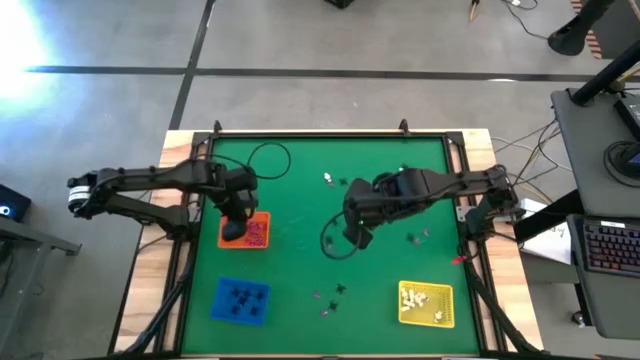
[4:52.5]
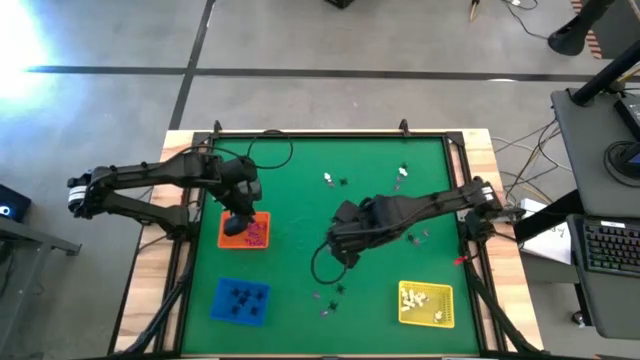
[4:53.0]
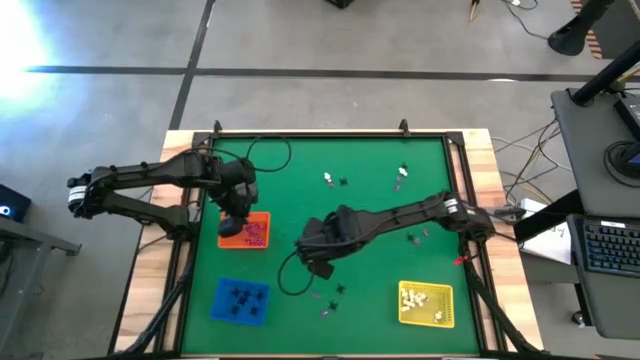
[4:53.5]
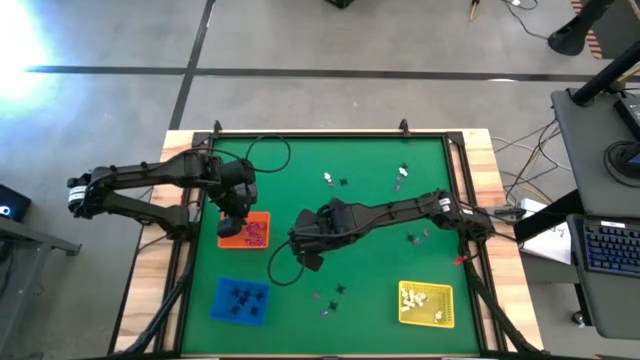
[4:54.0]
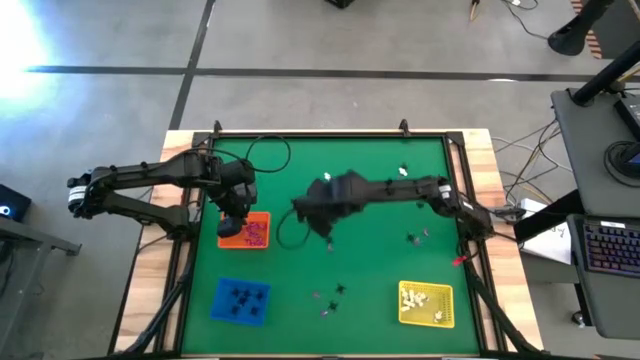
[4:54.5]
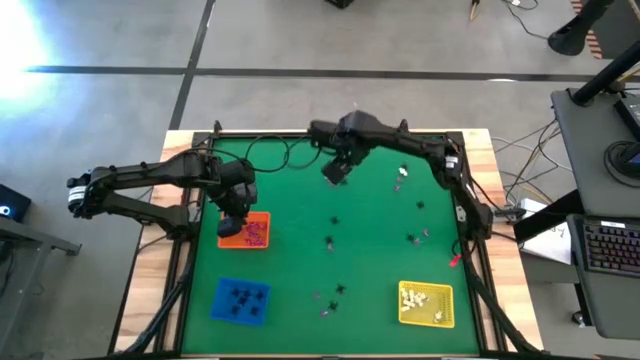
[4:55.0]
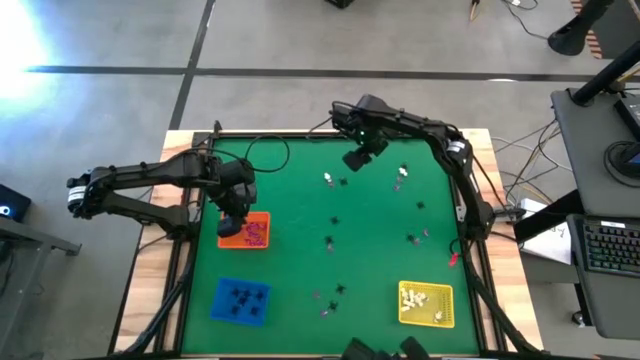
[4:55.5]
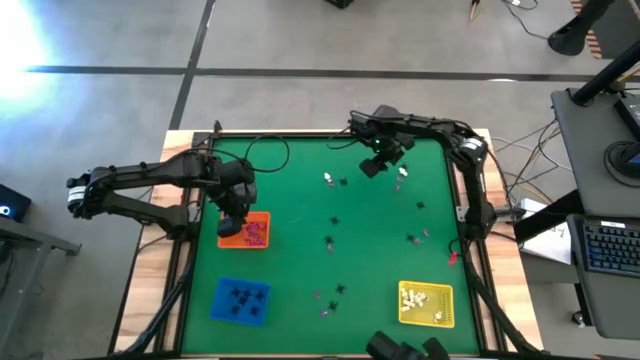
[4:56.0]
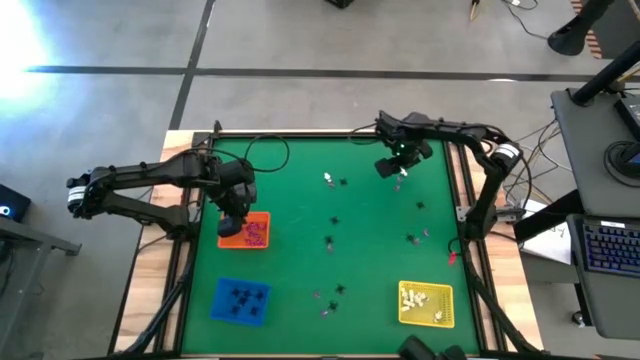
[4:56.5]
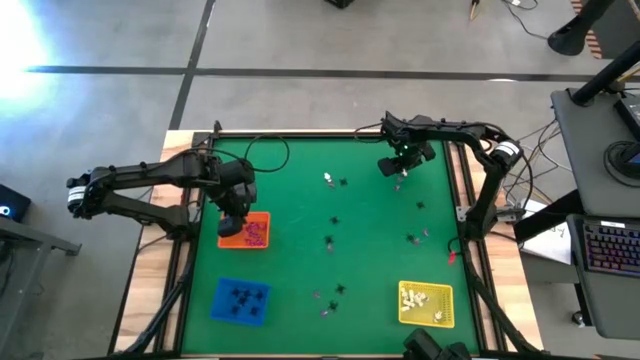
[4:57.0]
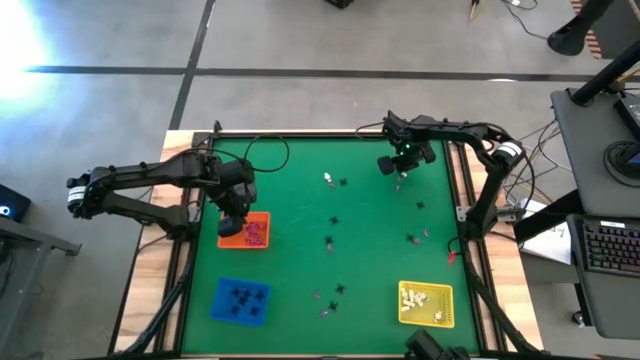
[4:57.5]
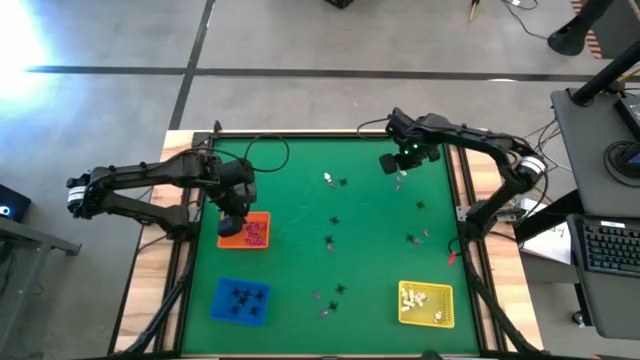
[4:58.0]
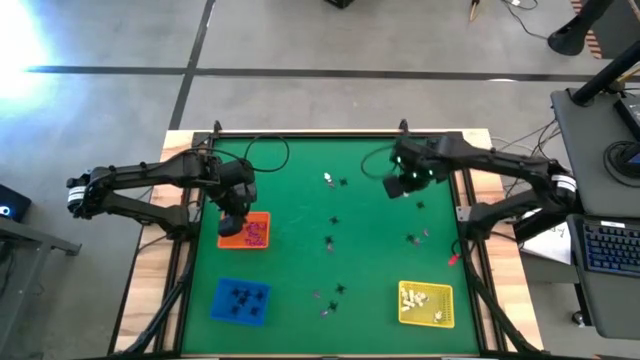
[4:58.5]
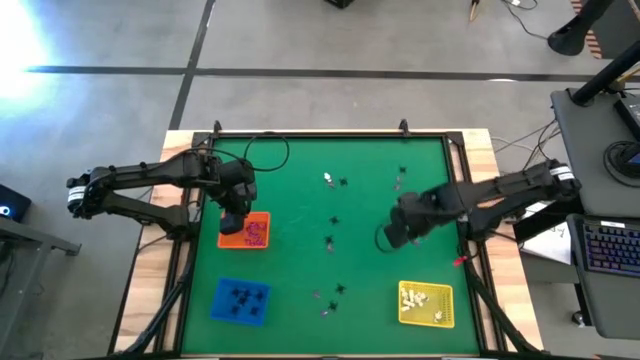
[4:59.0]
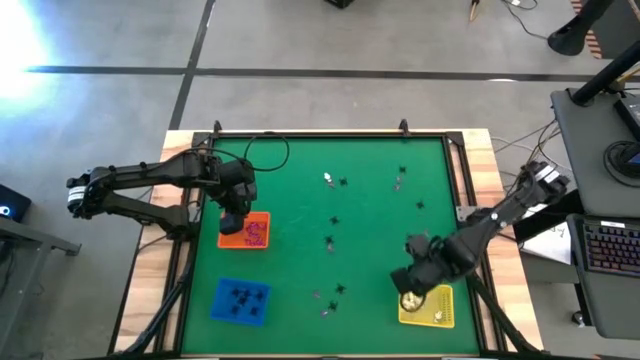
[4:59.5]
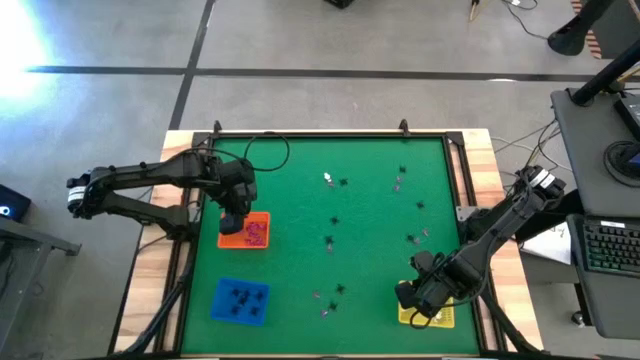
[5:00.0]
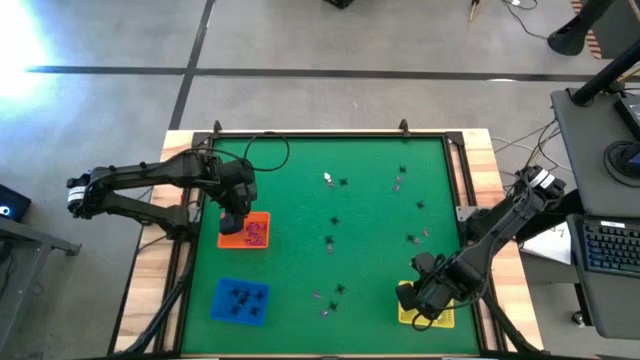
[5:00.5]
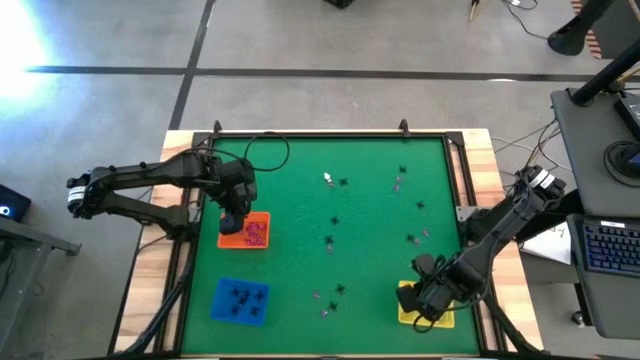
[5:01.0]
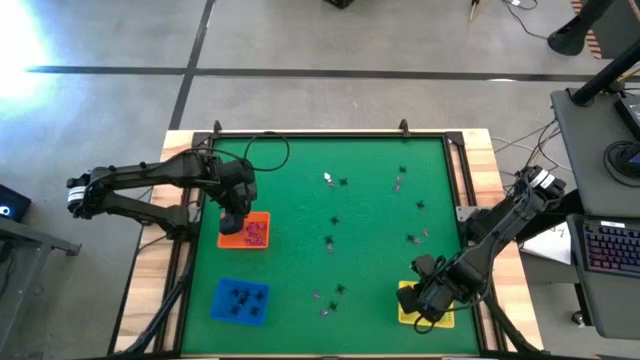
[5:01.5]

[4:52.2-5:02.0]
Task: Sort Halloween decoration
Put the white skeleton toy into the yellow bin

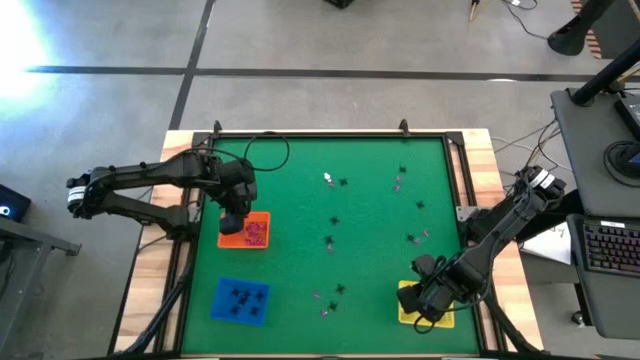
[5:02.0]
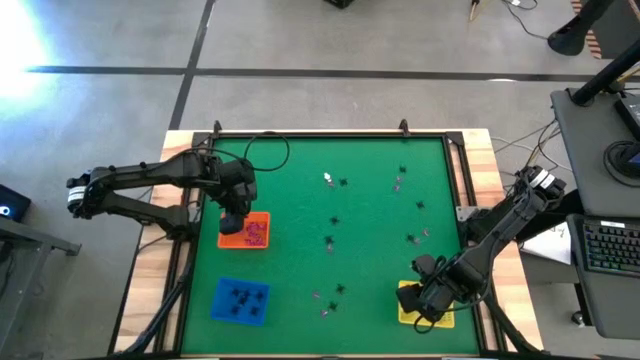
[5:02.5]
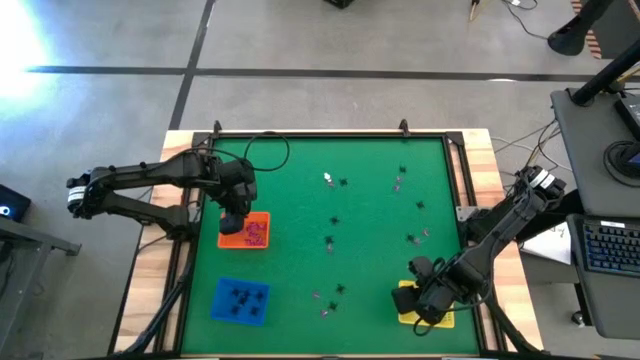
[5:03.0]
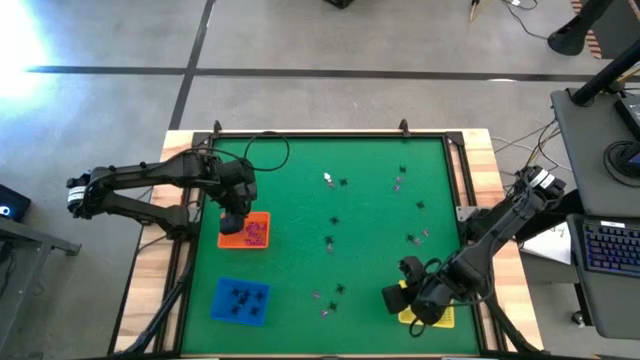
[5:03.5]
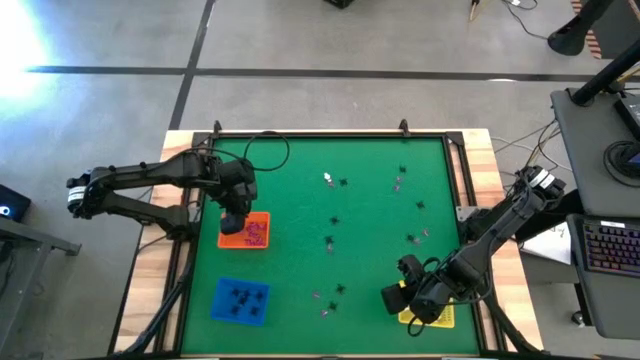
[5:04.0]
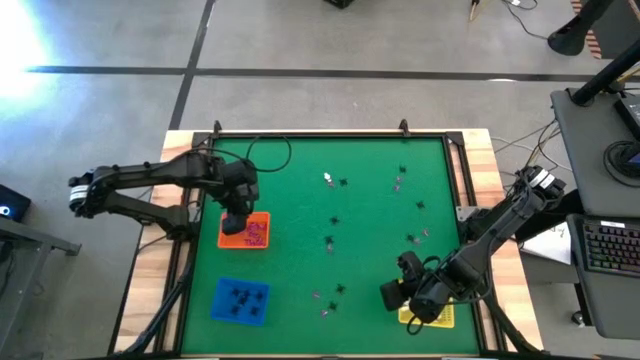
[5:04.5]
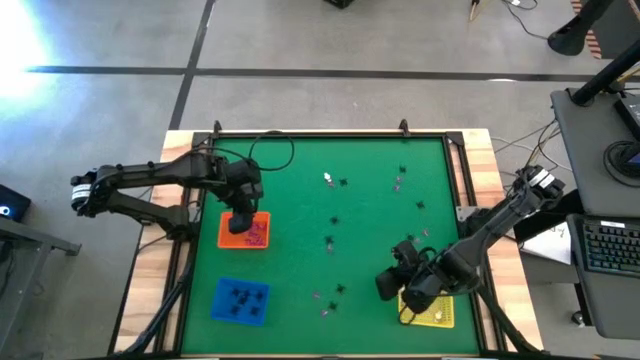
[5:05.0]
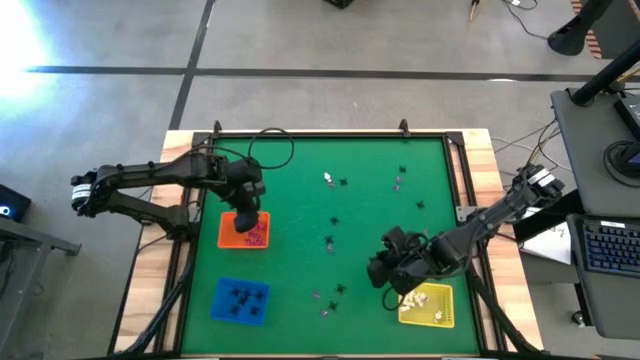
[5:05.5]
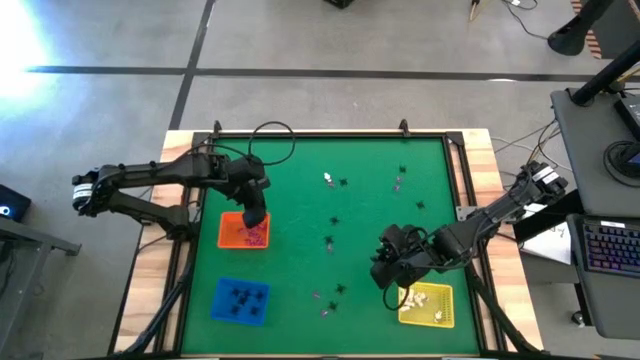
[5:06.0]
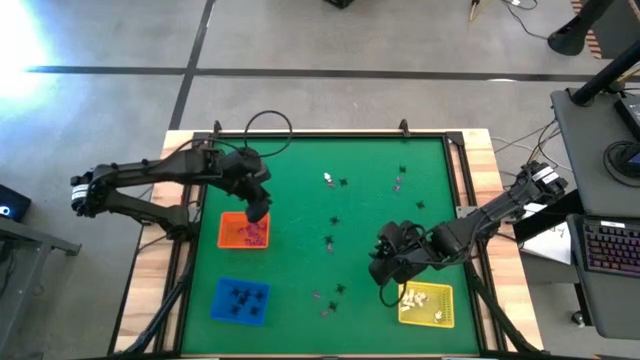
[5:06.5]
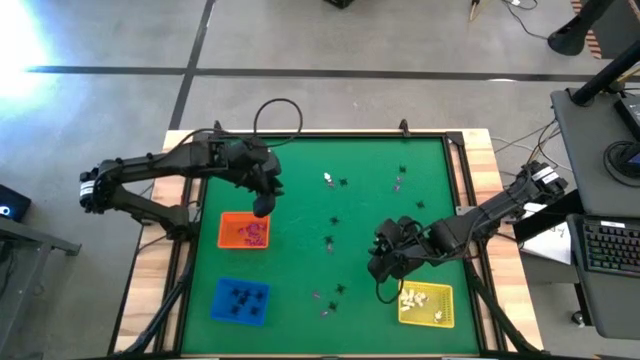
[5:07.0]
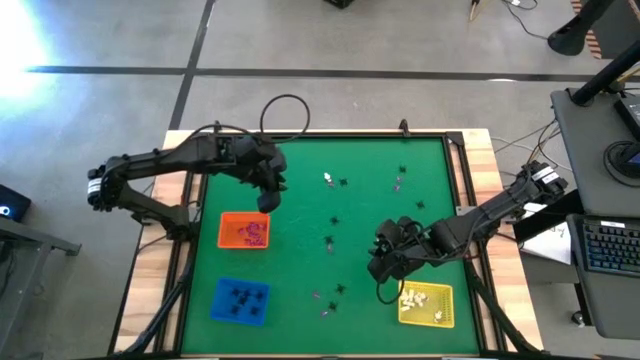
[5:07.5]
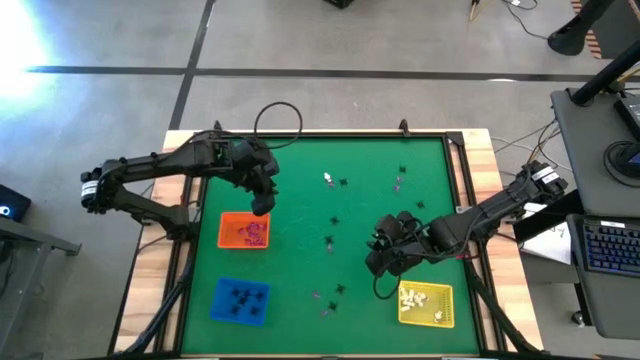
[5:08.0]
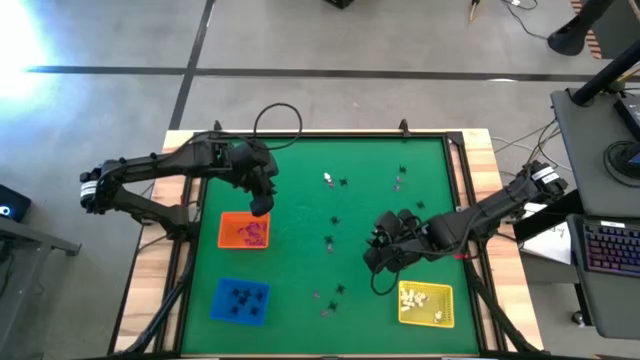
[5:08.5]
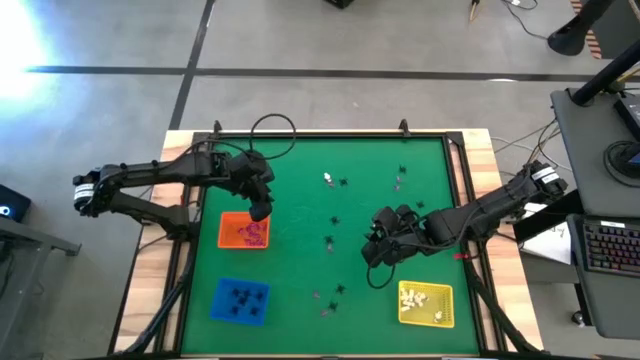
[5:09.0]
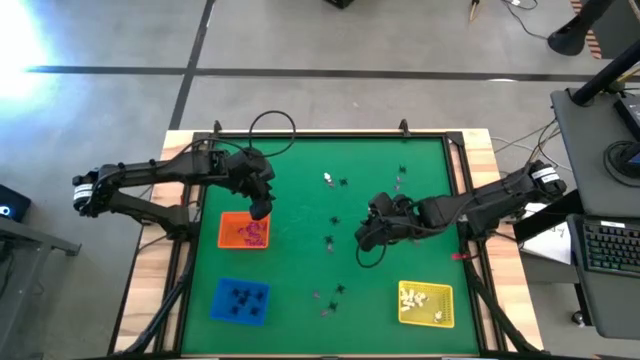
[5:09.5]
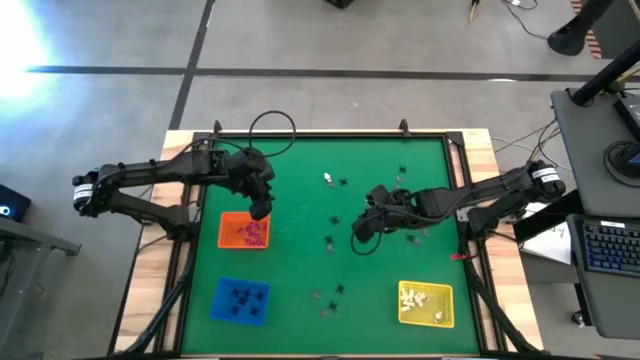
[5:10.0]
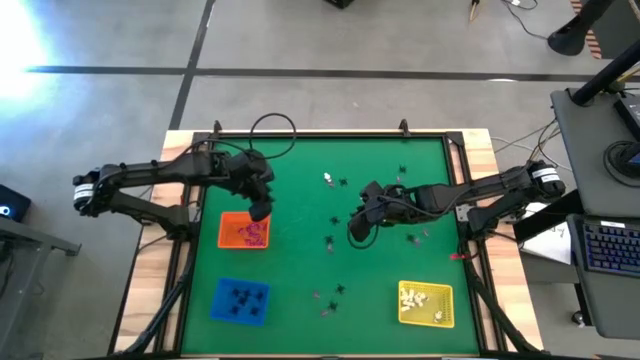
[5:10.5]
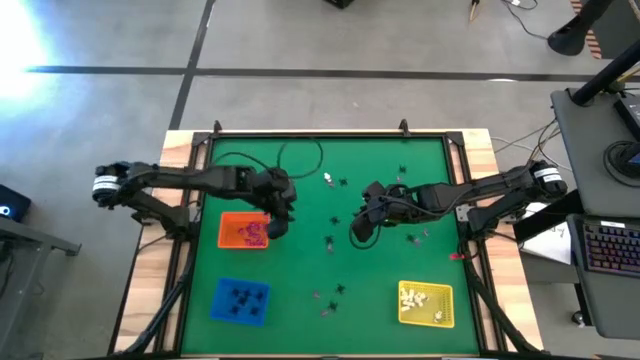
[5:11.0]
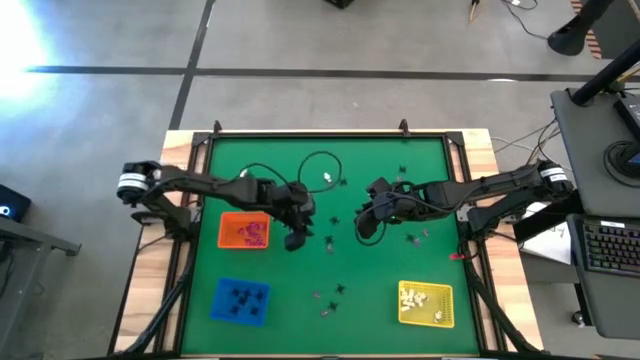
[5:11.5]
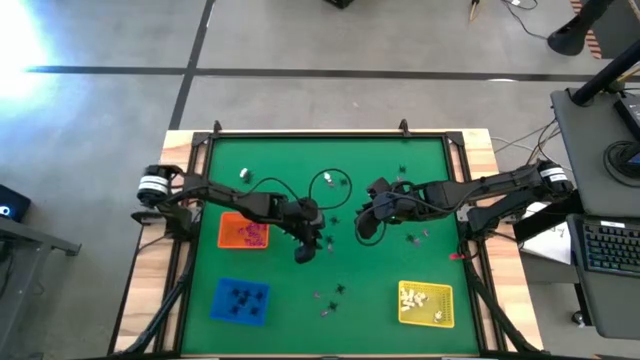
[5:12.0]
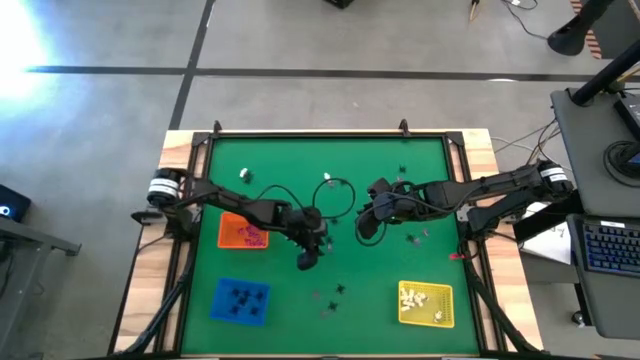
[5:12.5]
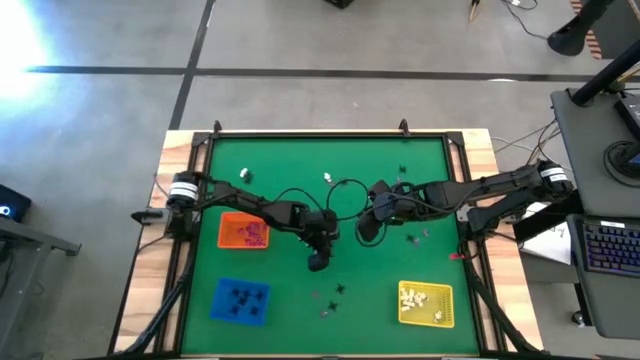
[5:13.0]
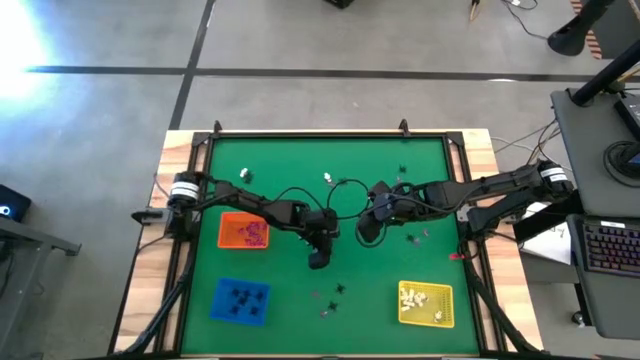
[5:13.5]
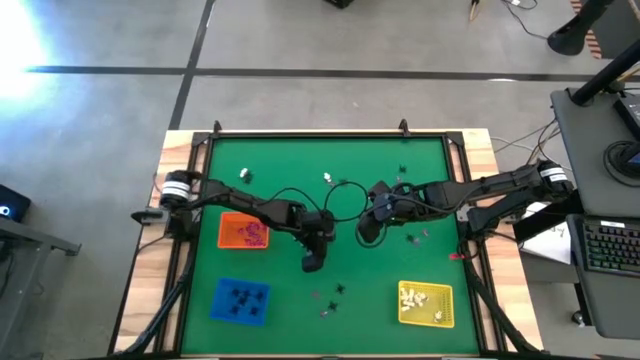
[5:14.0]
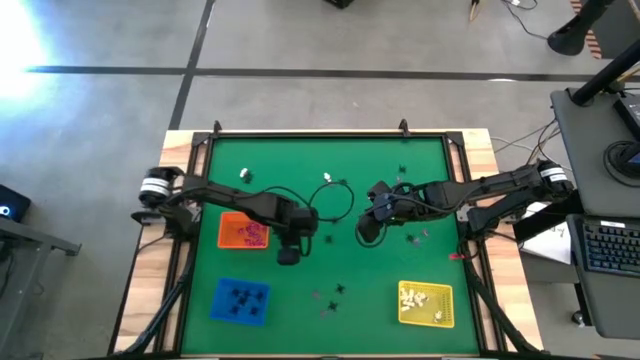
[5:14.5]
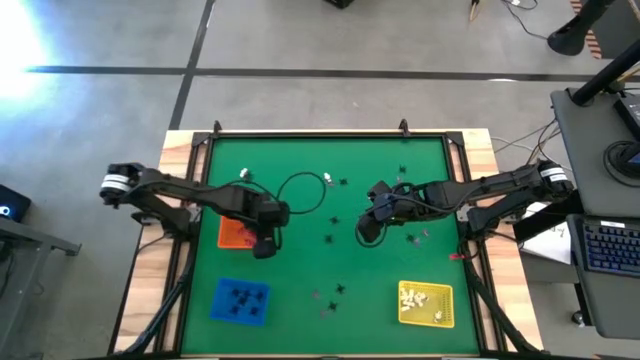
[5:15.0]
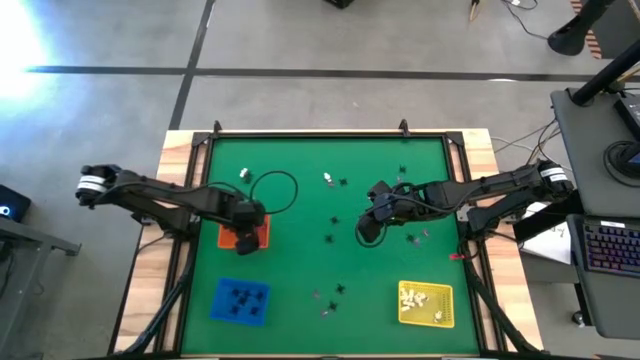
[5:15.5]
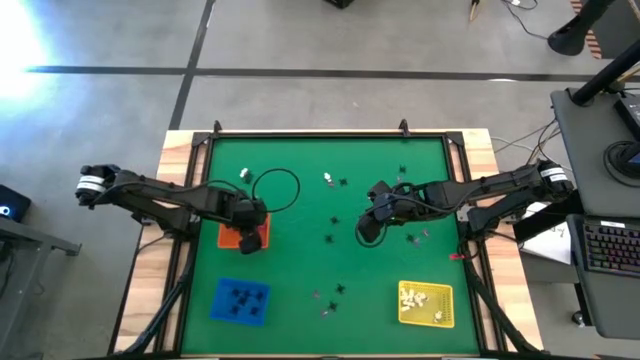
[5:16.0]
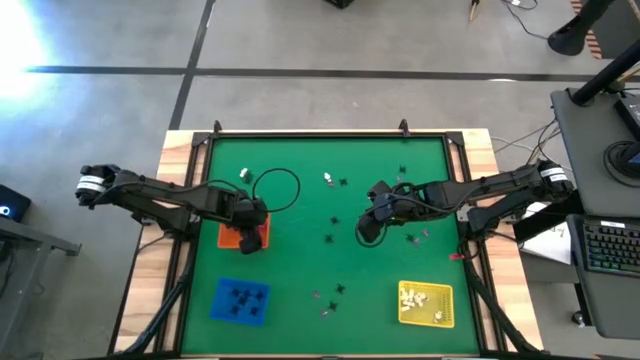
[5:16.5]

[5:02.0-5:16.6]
Put the violet witch hat toy into the orange bin
